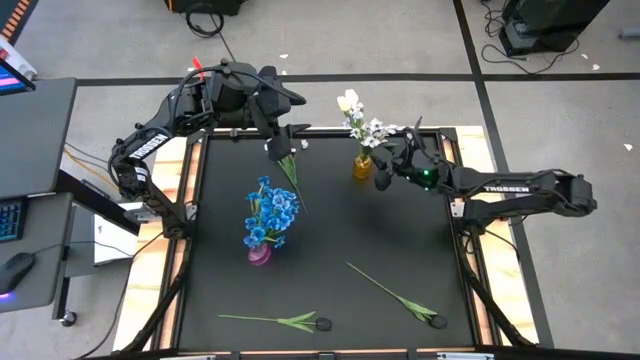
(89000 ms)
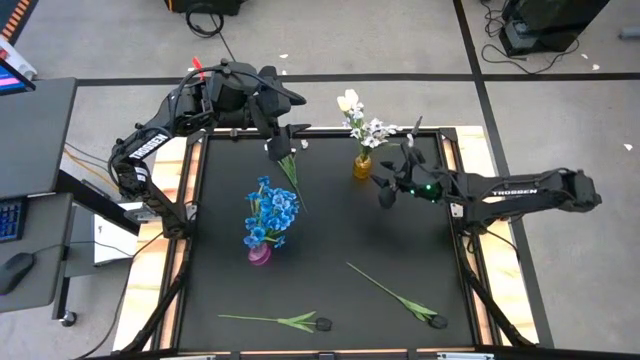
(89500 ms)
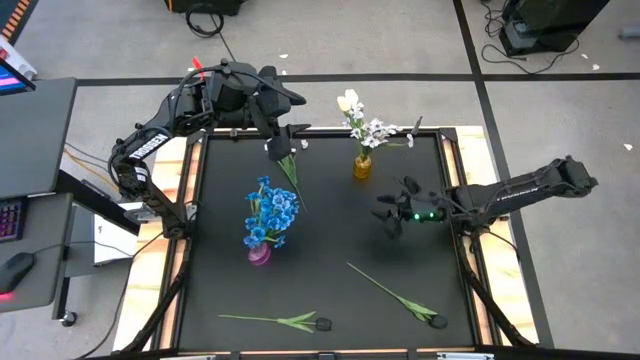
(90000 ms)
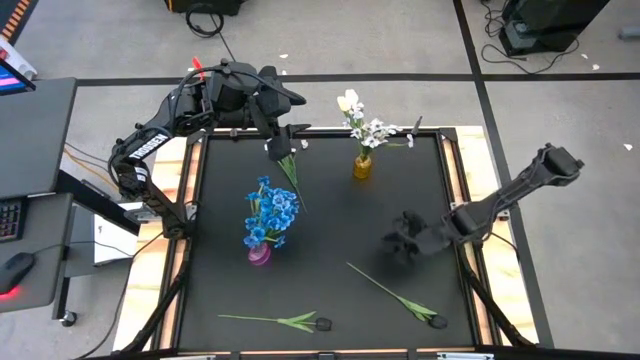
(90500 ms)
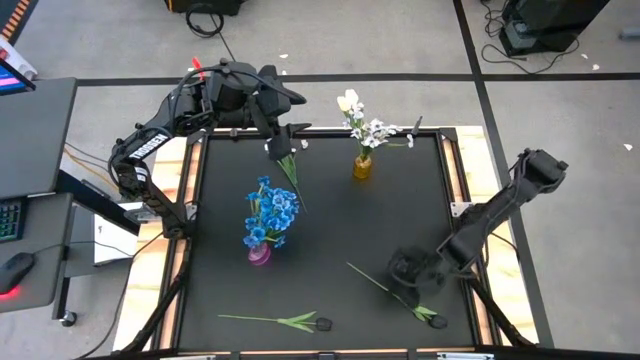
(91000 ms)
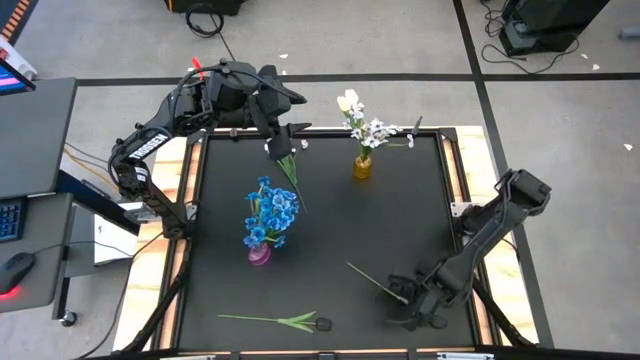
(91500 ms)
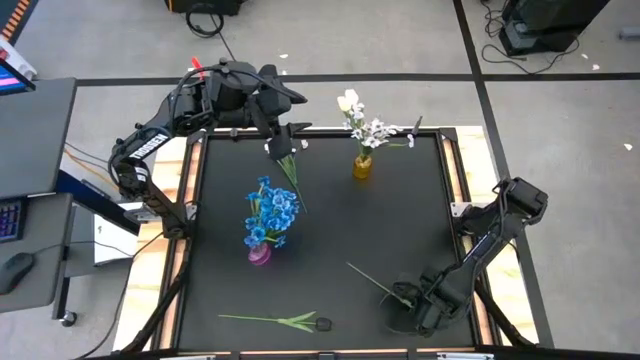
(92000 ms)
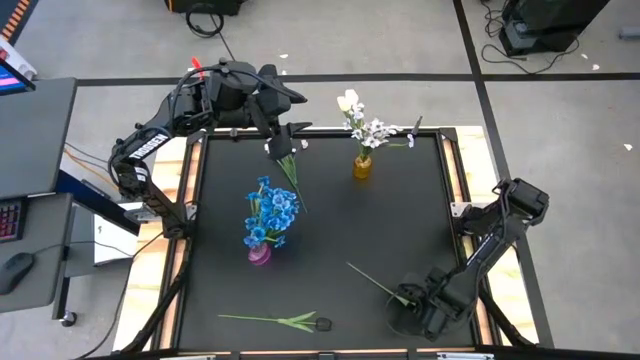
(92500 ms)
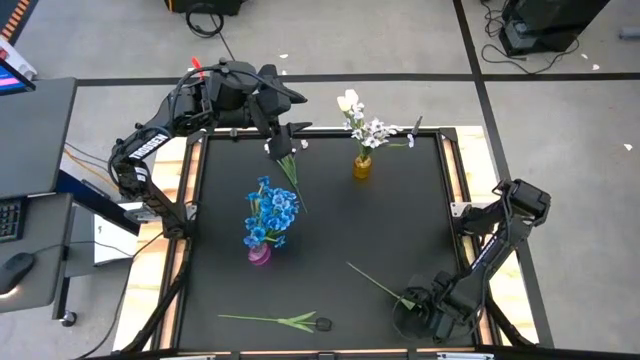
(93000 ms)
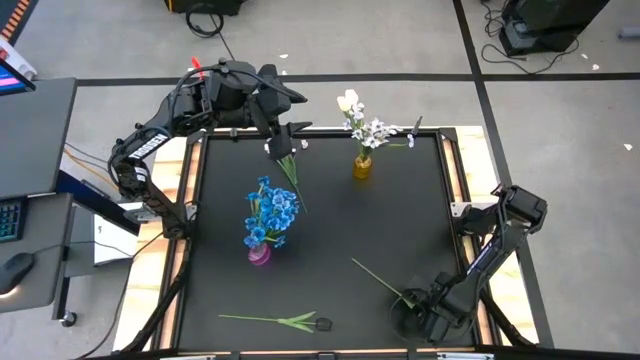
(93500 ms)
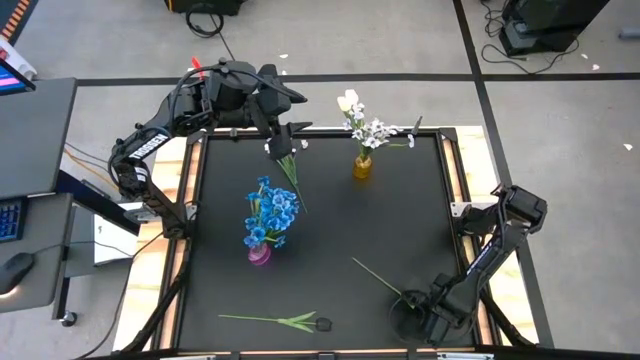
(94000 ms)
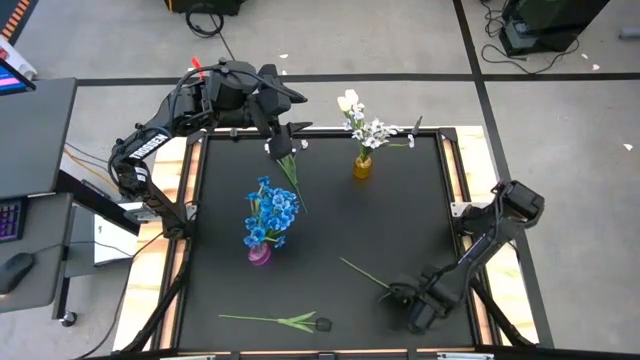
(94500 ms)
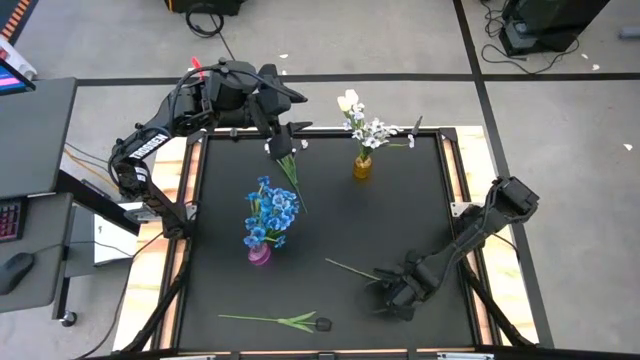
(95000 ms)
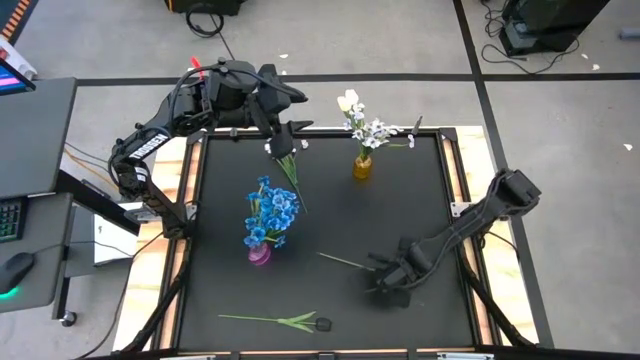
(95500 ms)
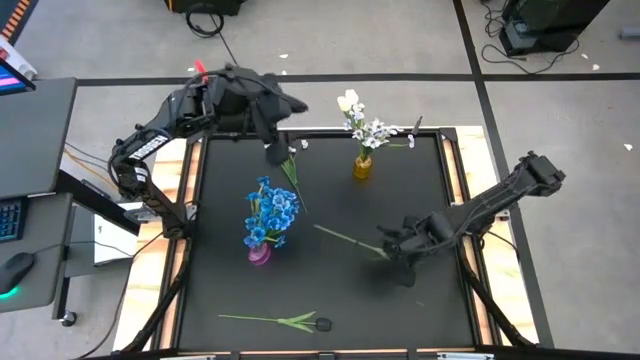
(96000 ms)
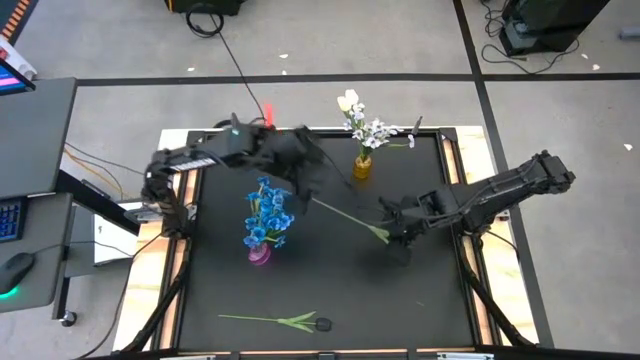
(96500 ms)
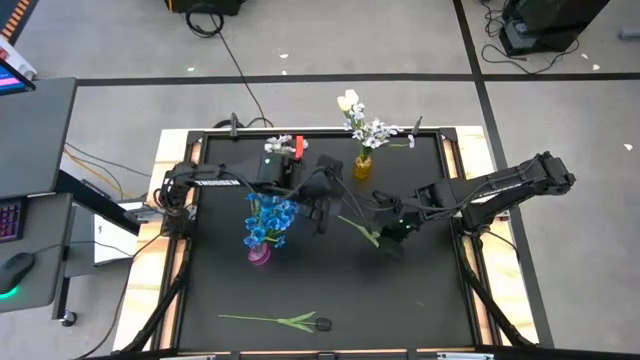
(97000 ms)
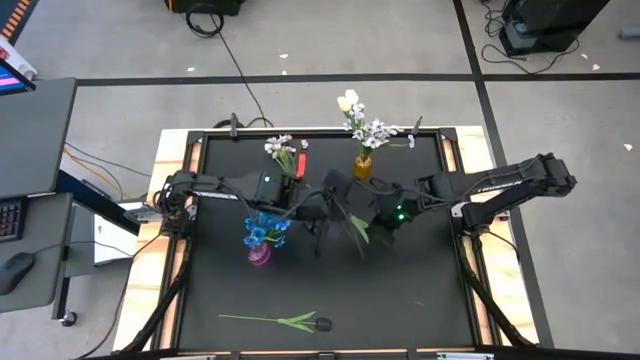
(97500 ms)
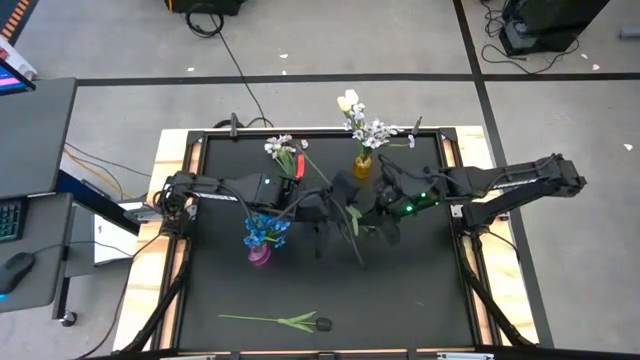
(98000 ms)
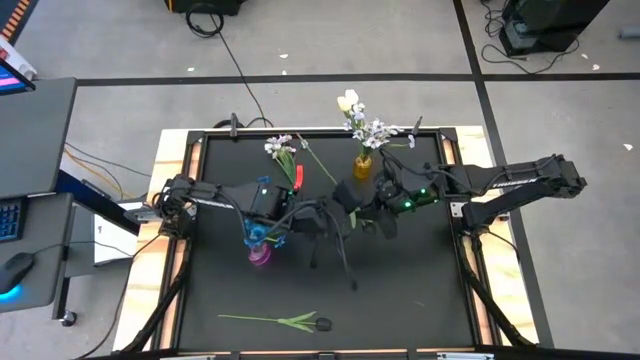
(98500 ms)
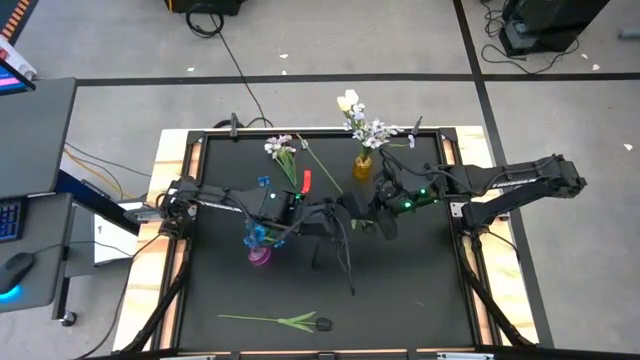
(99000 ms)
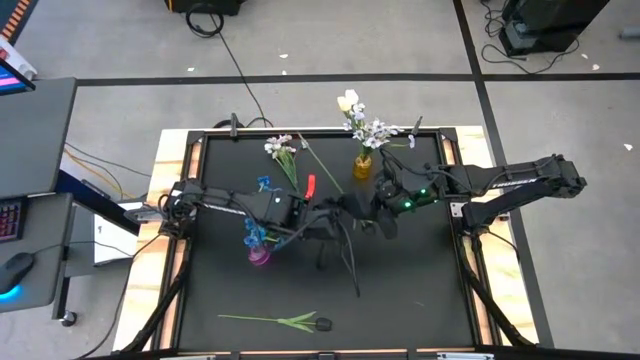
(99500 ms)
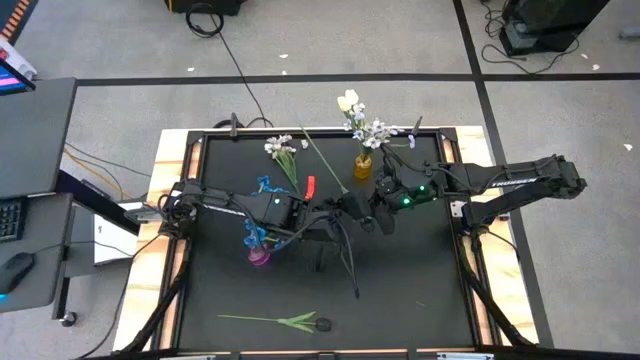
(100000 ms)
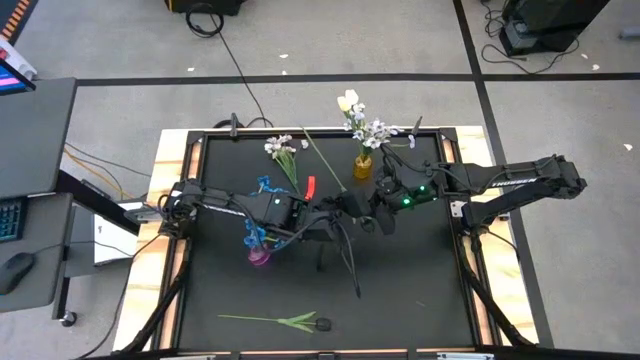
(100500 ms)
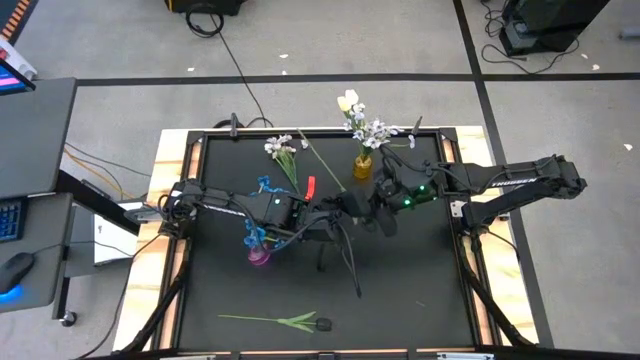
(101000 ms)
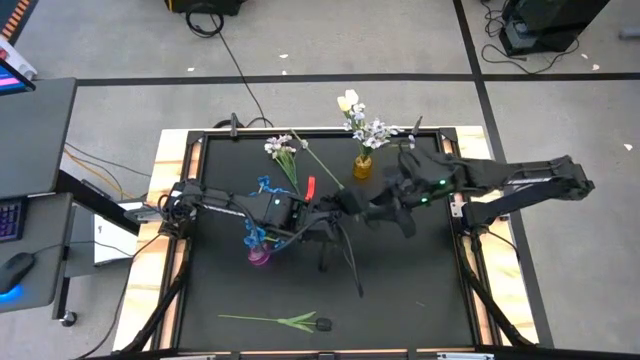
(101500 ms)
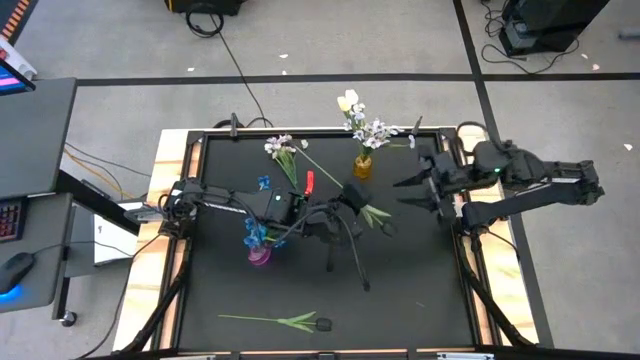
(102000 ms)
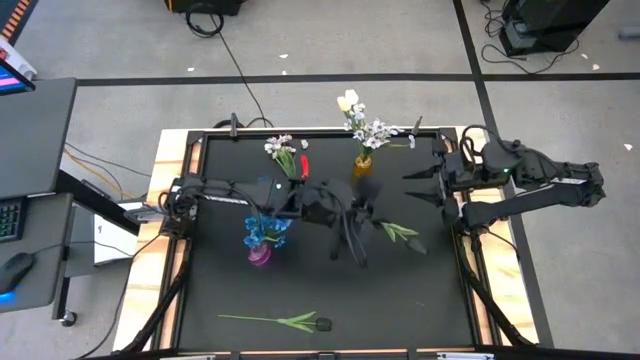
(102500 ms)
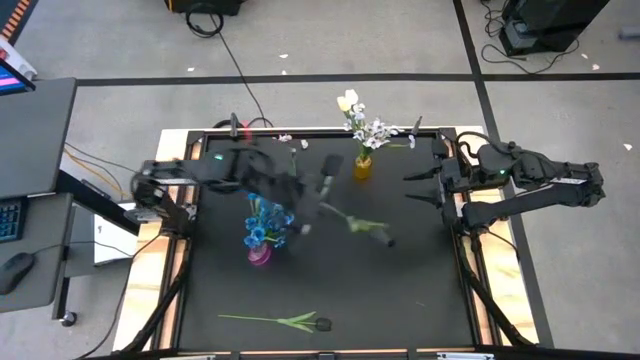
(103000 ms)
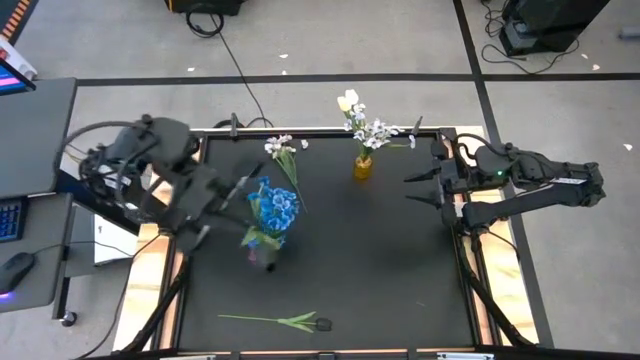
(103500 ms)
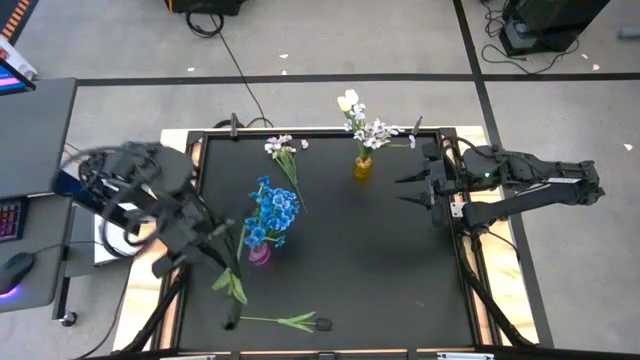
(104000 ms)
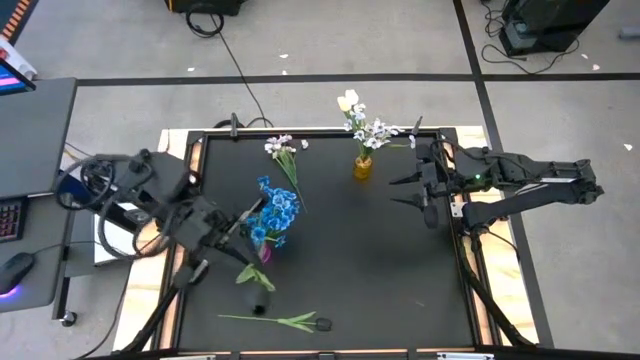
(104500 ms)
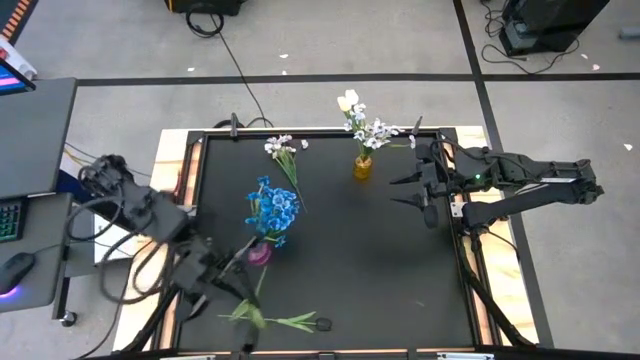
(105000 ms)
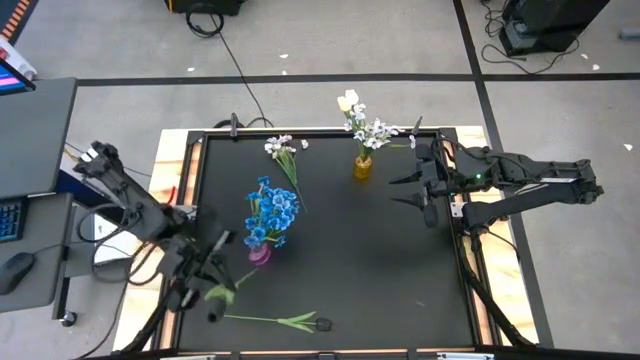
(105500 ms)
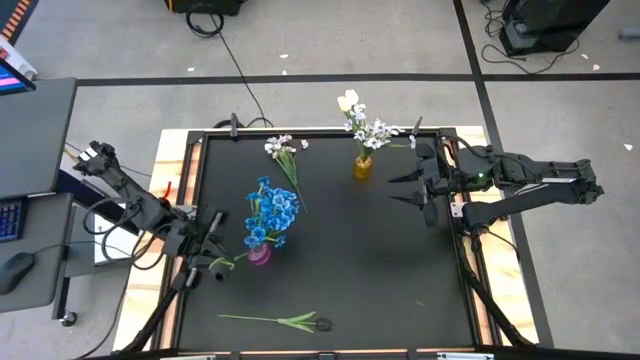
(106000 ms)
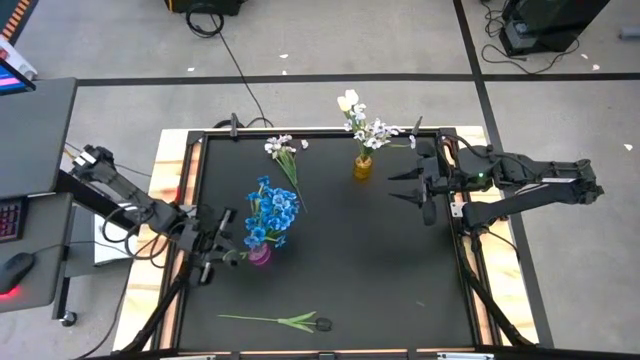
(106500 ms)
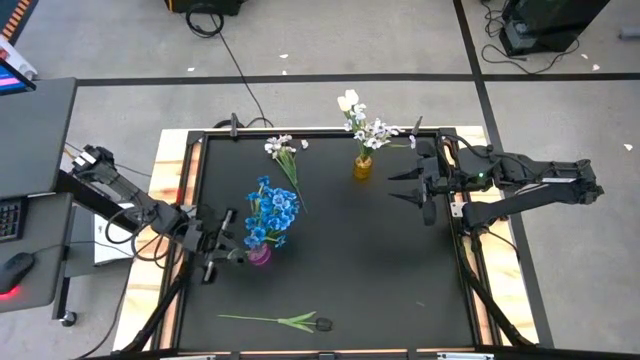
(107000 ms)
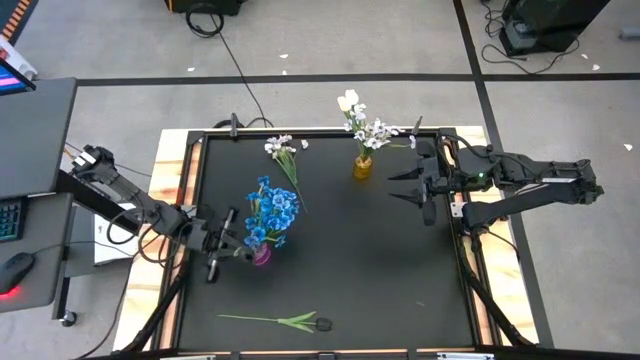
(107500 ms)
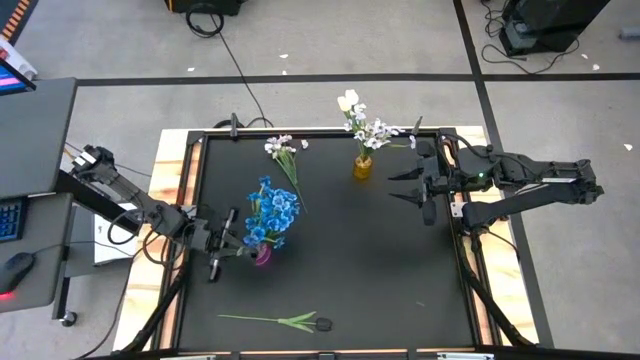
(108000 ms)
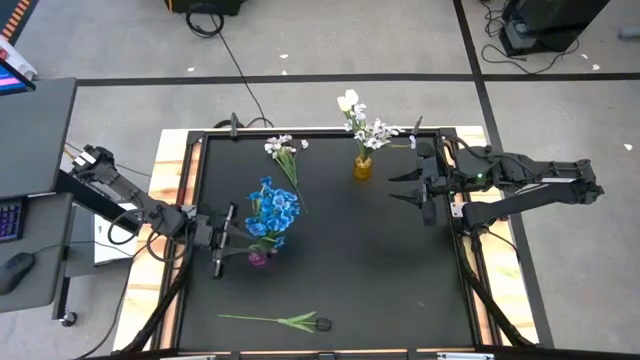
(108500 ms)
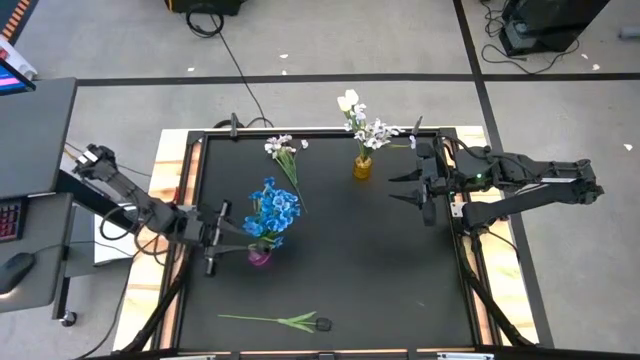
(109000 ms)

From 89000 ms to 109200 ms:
Task: Sort flowers into vase by color
Put the right black tulip into the violet vase
